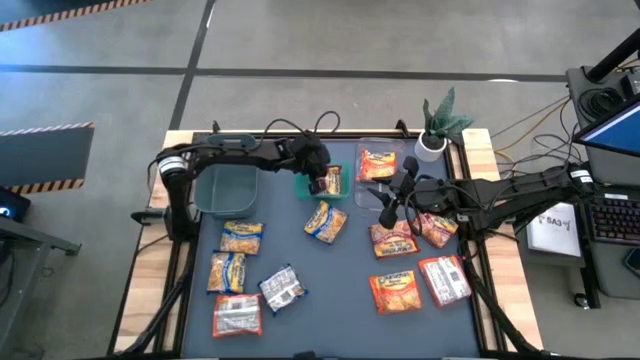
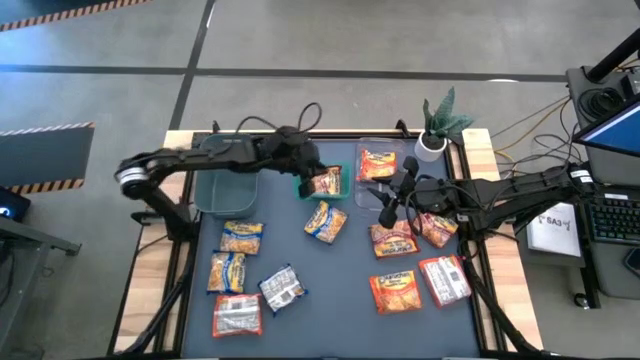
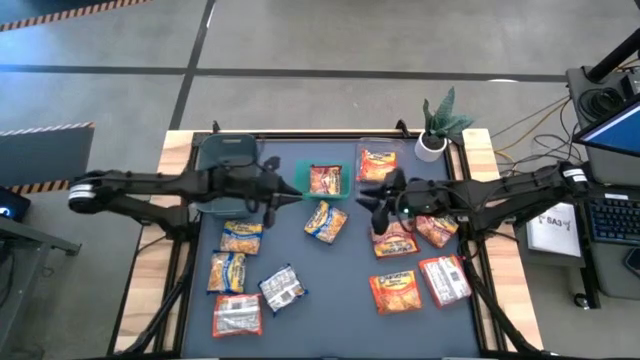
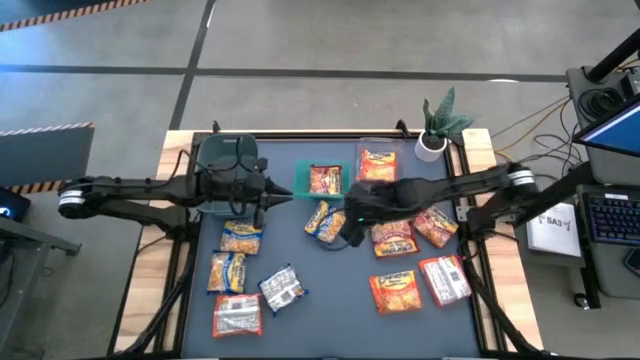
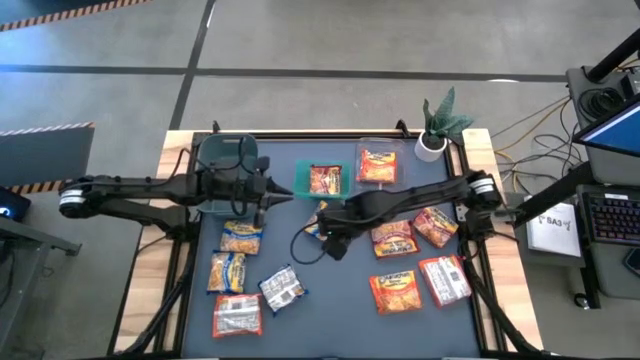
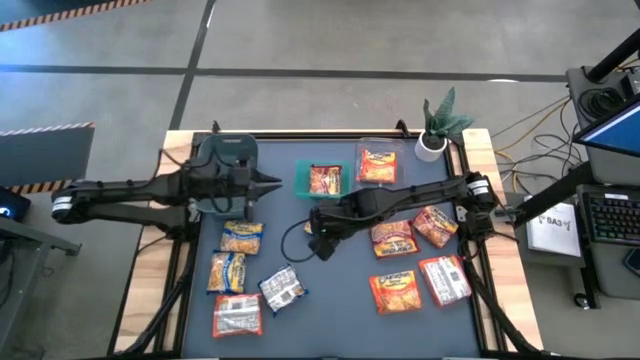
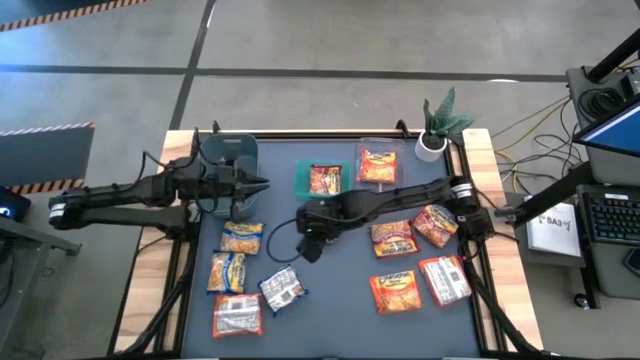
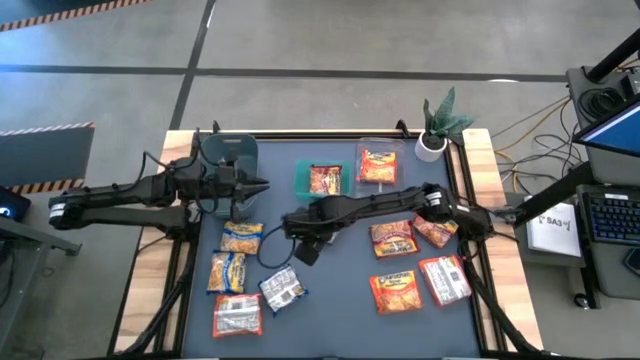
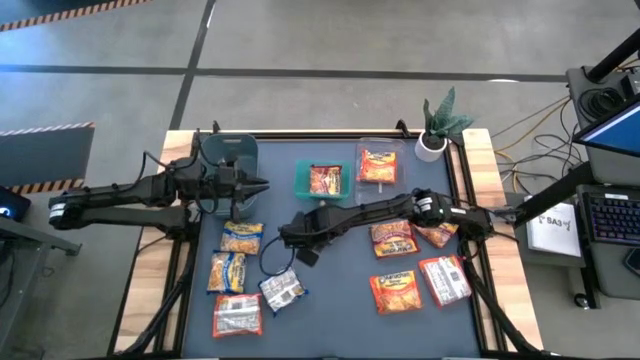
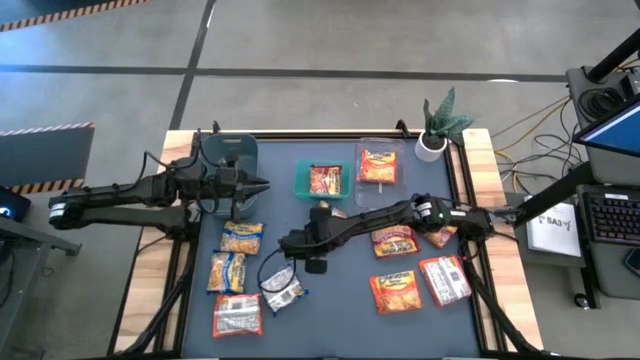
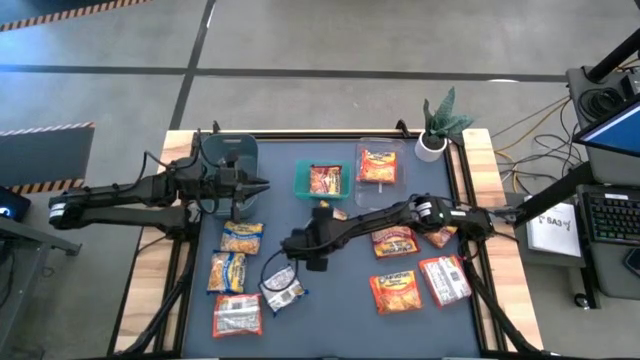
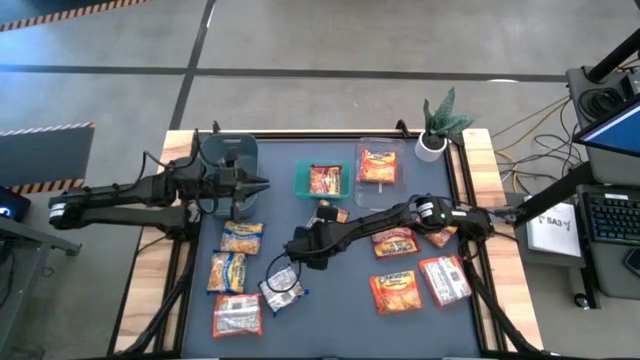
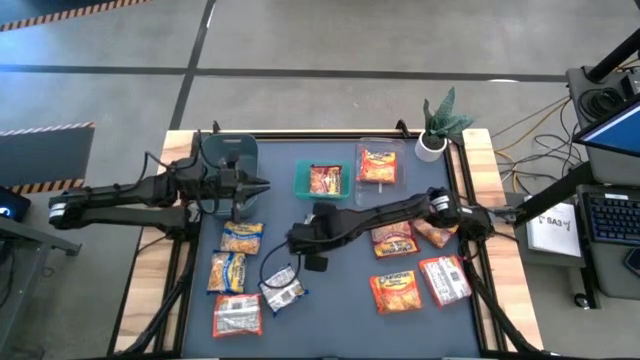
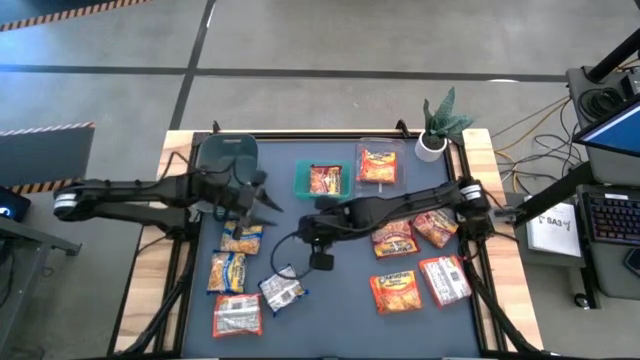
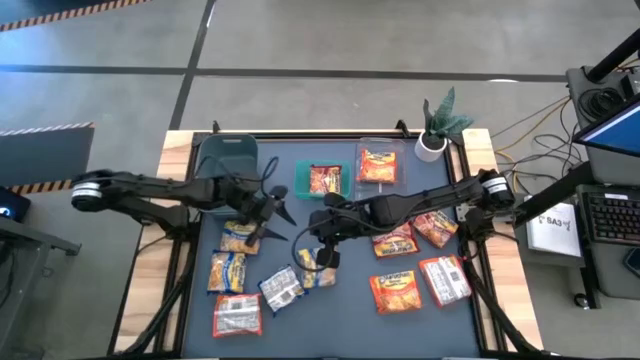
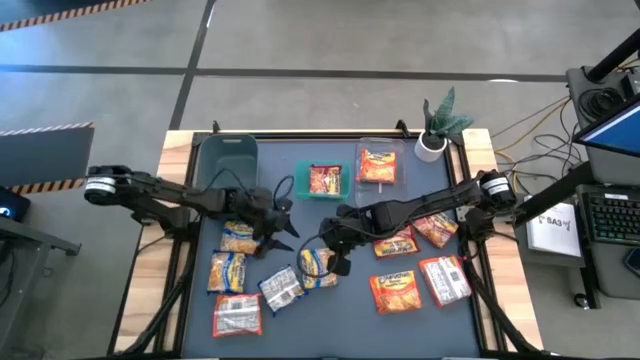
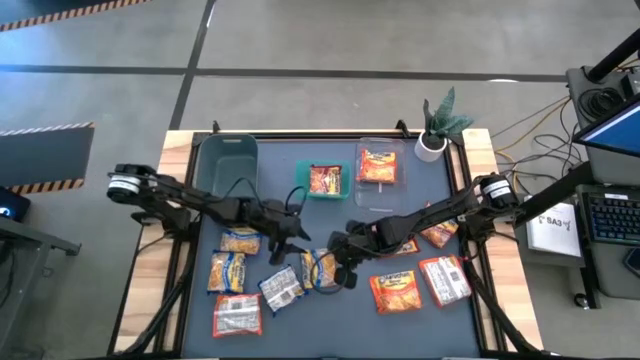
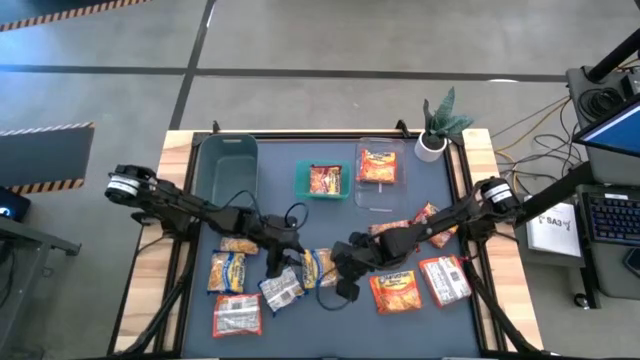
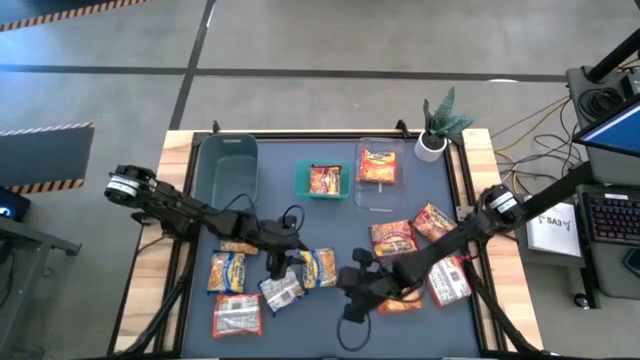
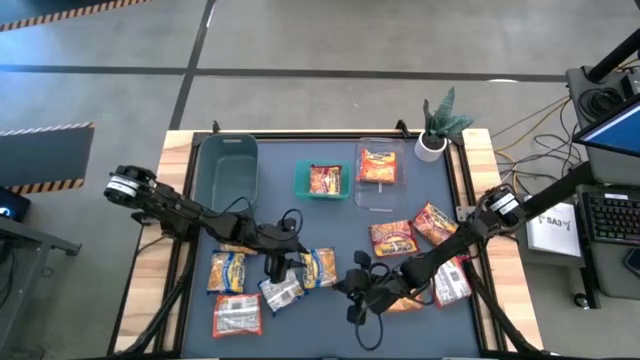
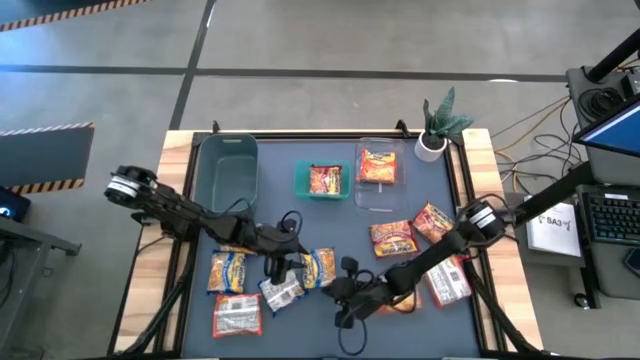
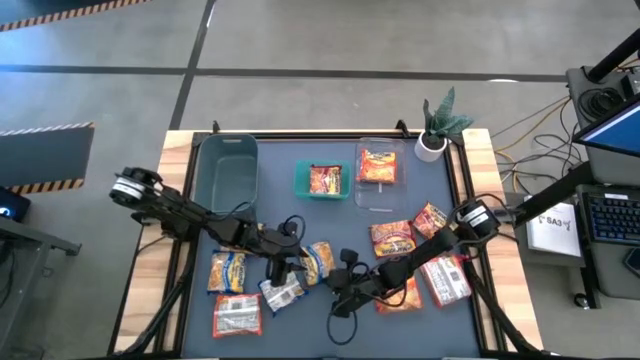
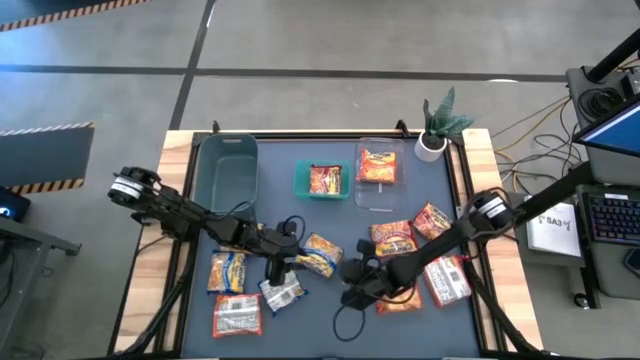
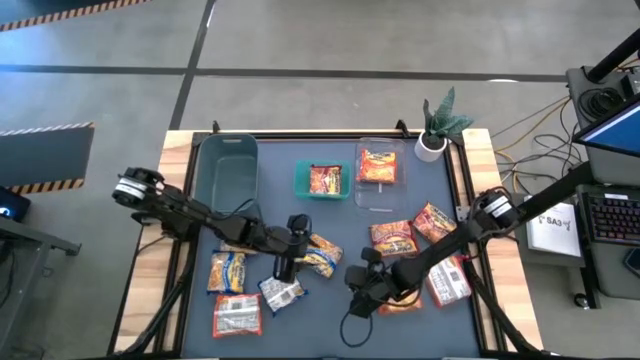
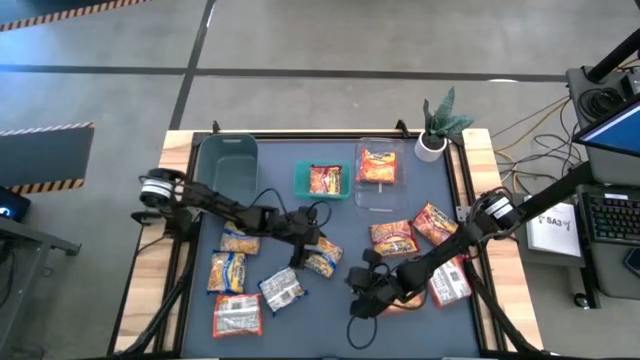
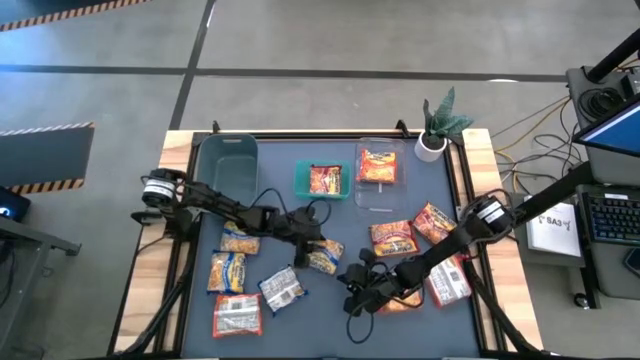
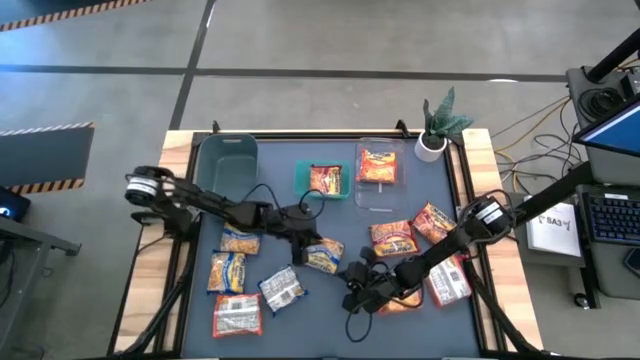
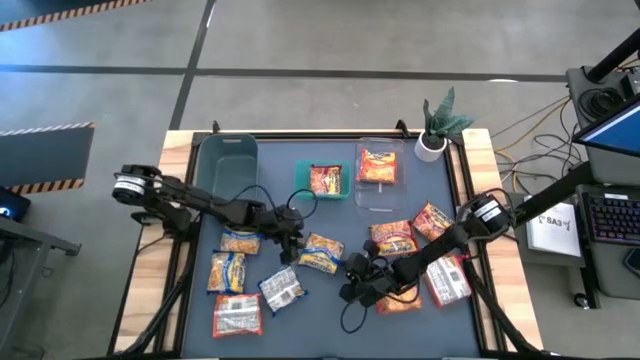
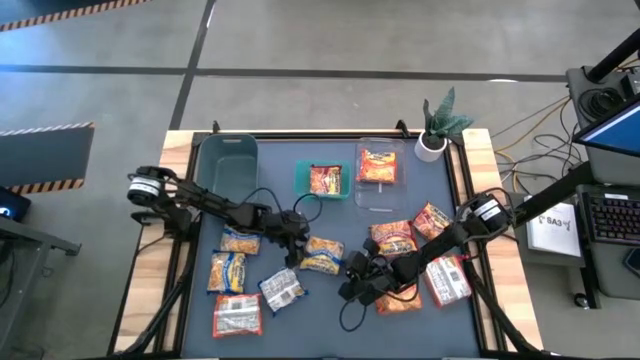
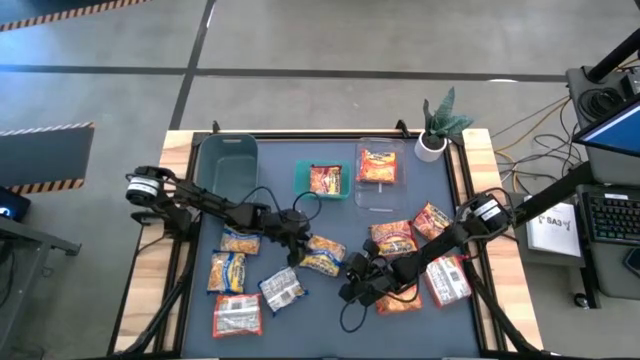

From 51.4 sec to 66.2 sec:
Task: Sort Maruchan noodles
Put the blue noodle pack into the dark blue bin

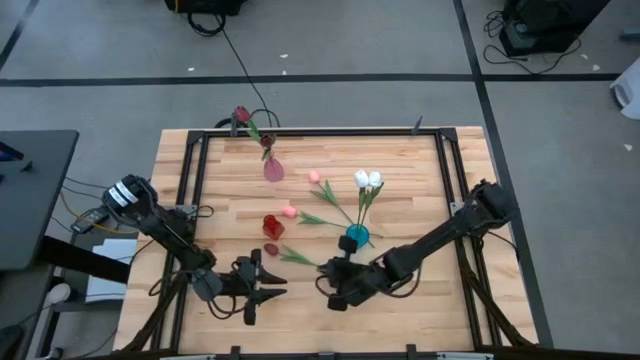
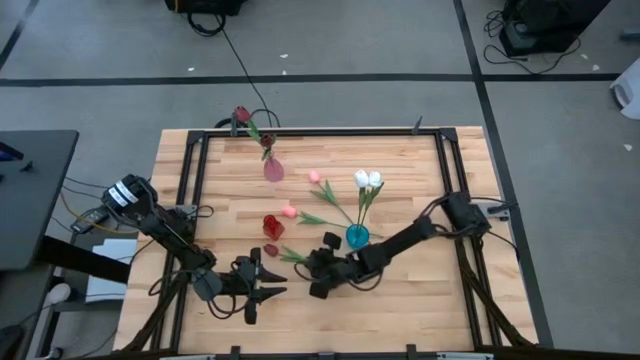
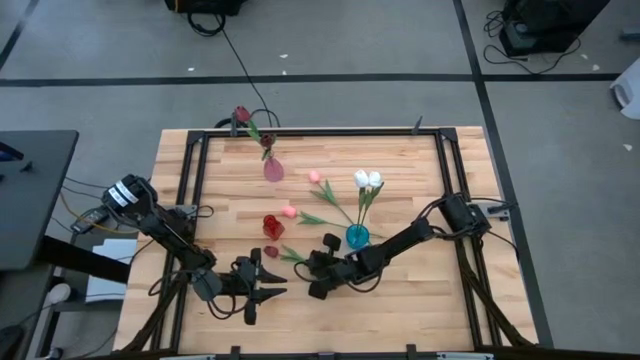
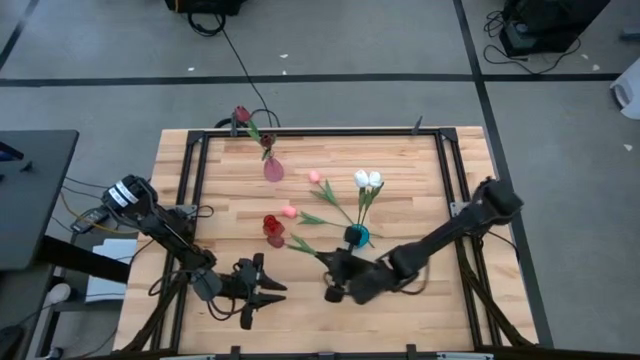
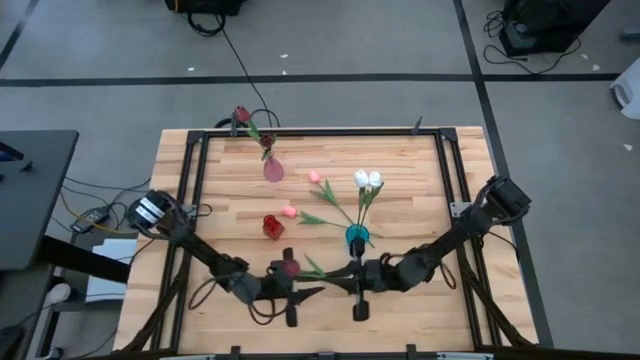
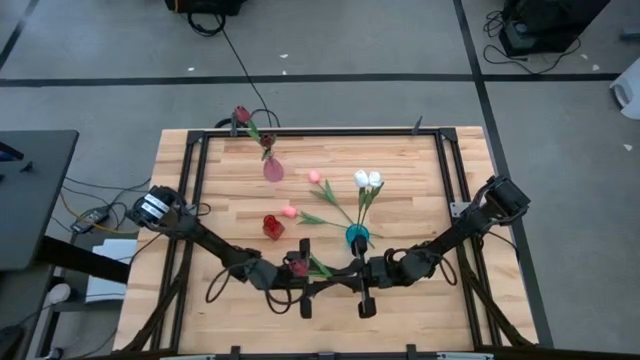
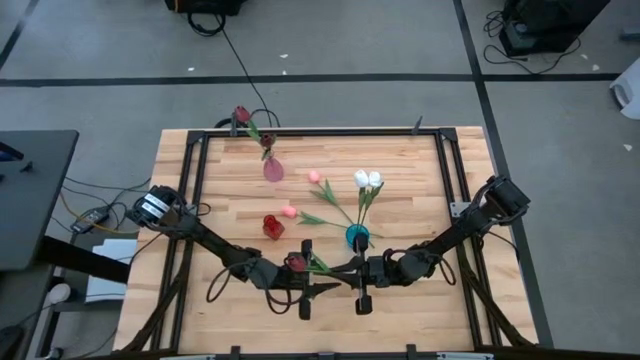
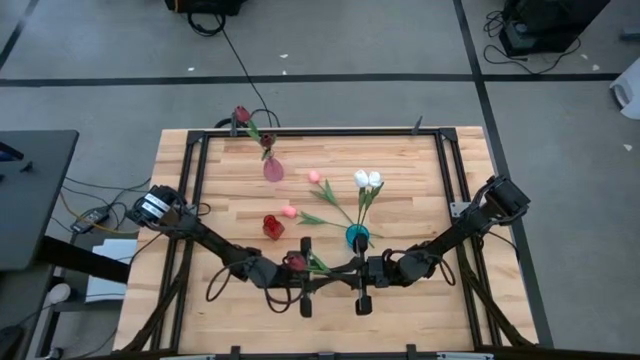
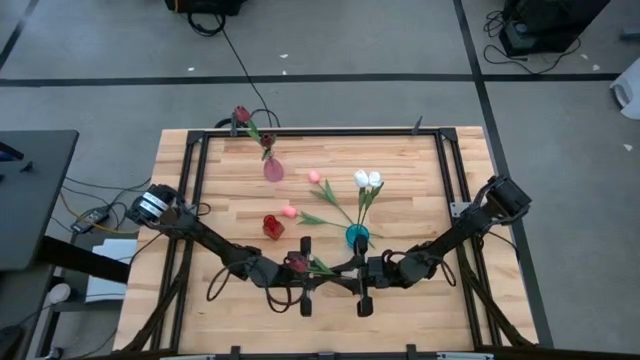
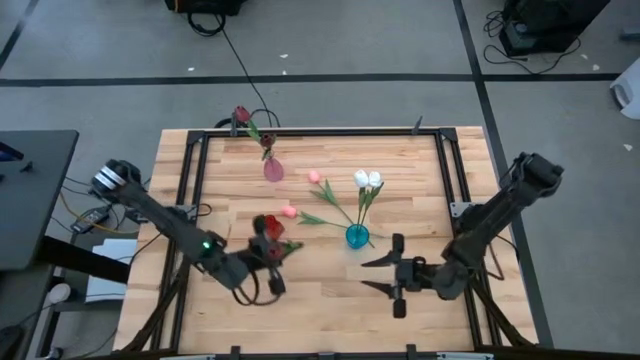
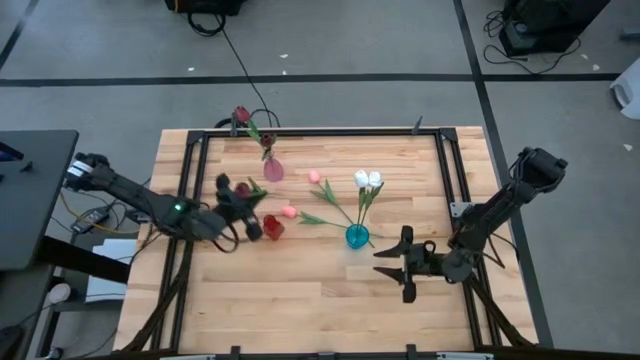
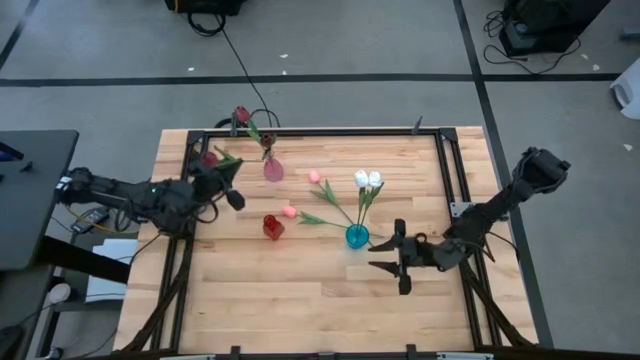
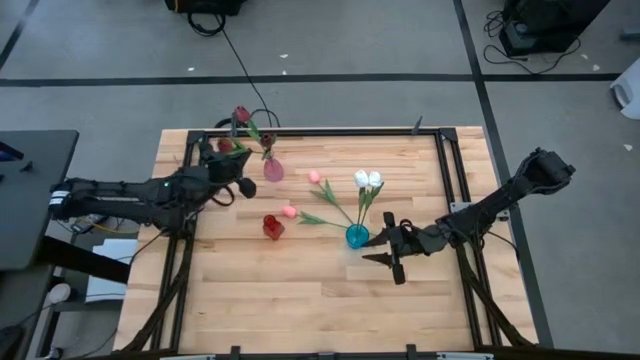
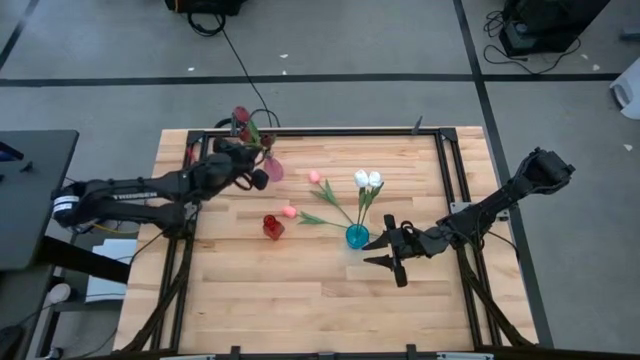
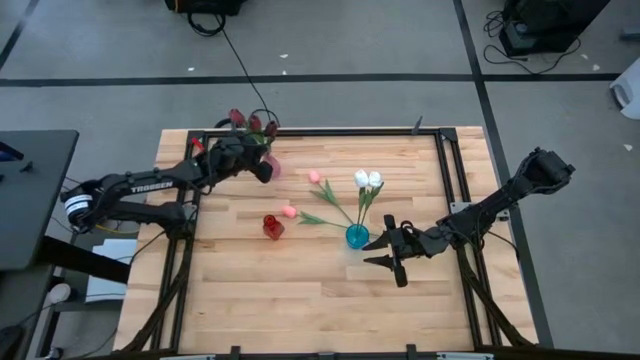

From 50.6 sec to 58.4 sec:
Task: Sort flowers into vase by color
Put the red tulip into the pink vase
